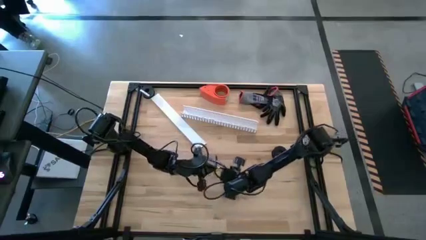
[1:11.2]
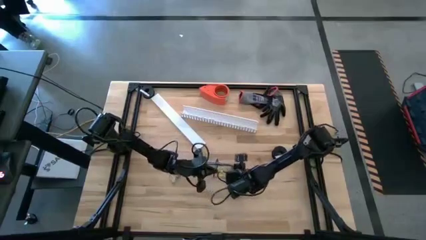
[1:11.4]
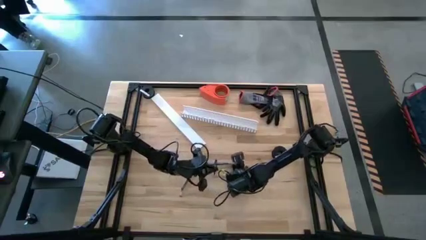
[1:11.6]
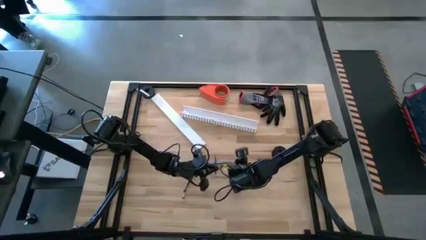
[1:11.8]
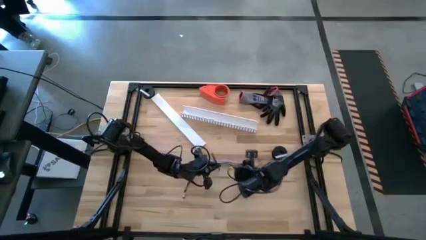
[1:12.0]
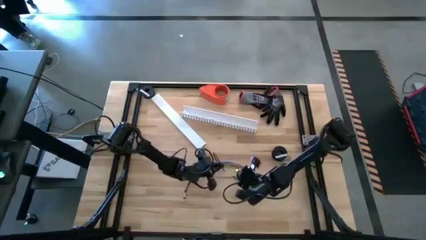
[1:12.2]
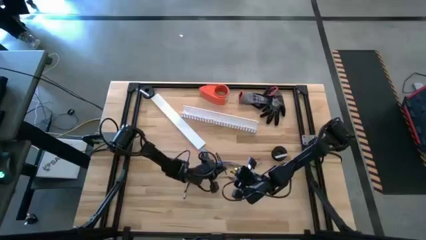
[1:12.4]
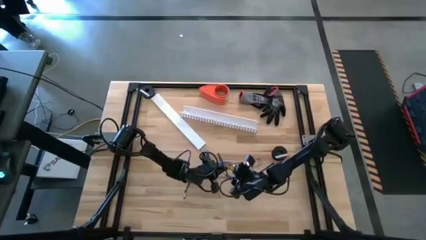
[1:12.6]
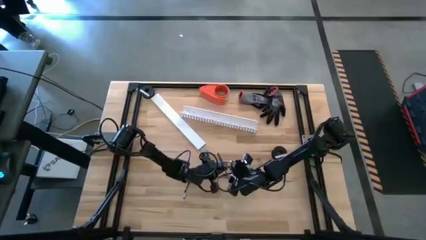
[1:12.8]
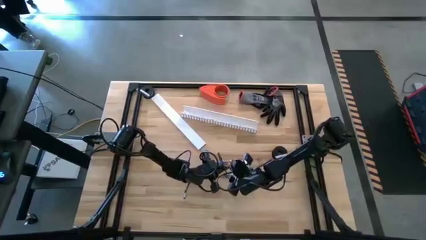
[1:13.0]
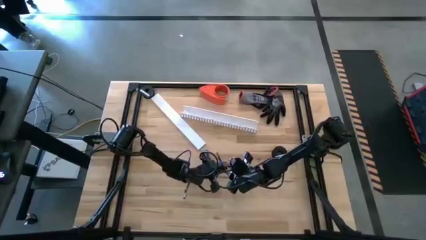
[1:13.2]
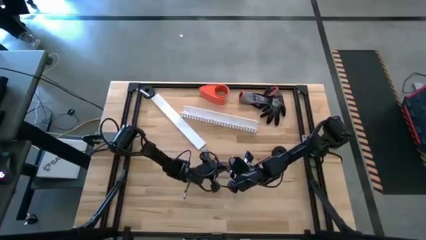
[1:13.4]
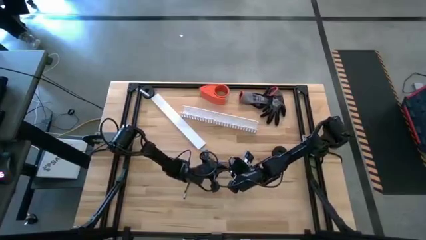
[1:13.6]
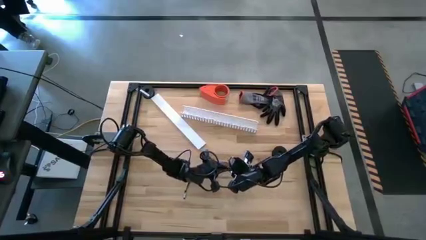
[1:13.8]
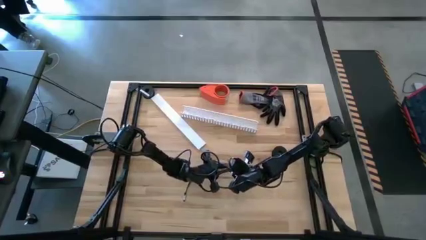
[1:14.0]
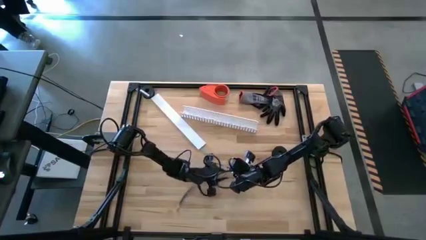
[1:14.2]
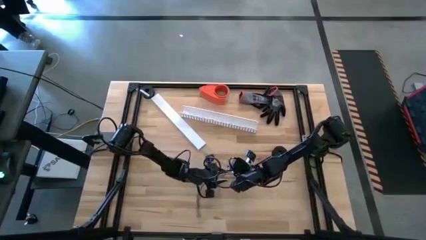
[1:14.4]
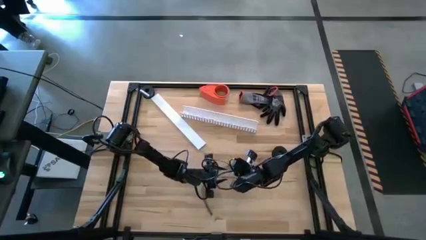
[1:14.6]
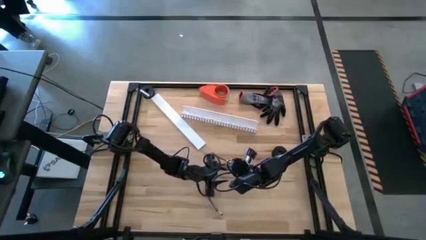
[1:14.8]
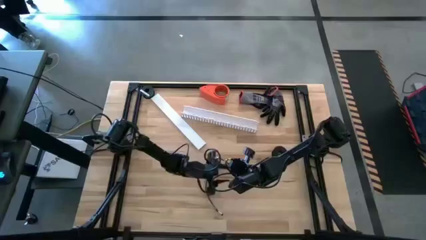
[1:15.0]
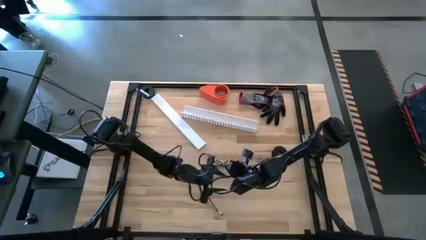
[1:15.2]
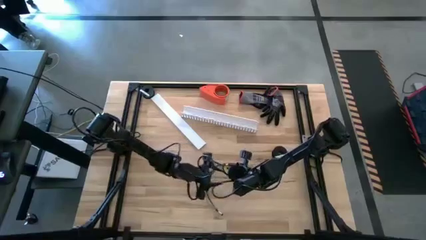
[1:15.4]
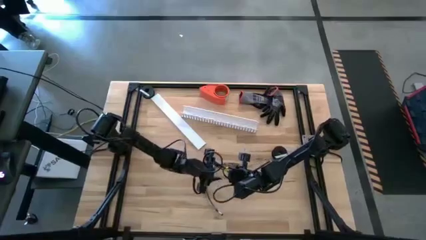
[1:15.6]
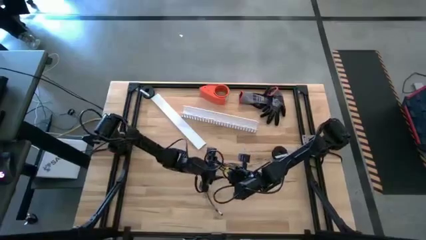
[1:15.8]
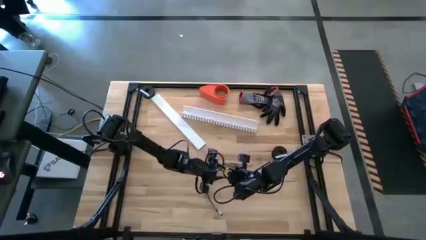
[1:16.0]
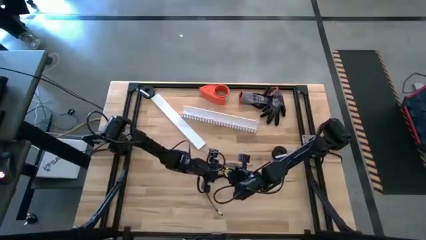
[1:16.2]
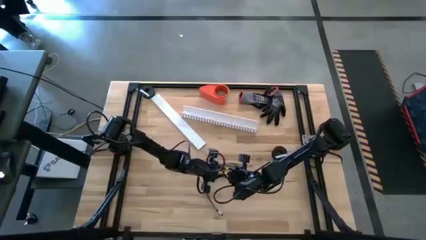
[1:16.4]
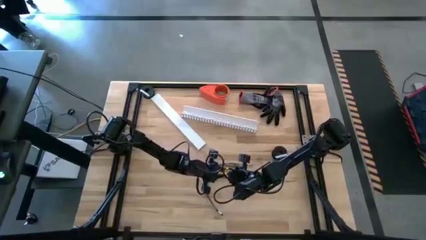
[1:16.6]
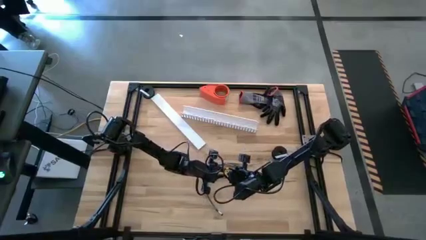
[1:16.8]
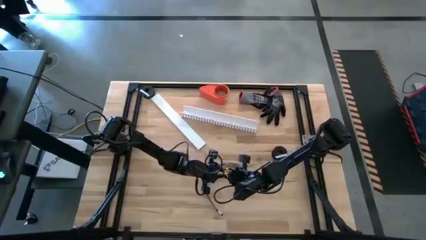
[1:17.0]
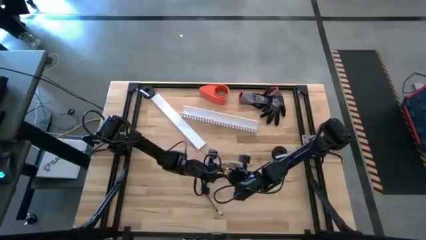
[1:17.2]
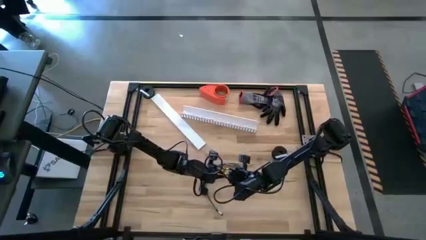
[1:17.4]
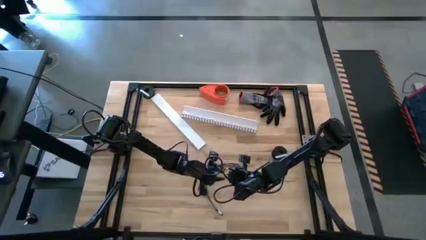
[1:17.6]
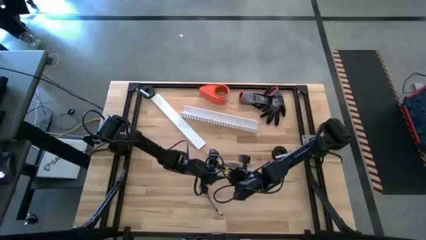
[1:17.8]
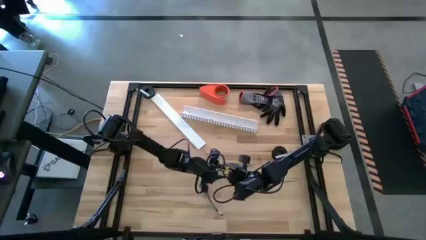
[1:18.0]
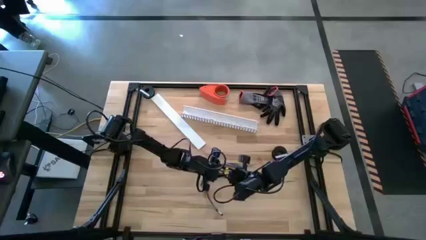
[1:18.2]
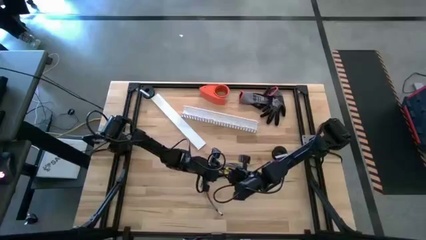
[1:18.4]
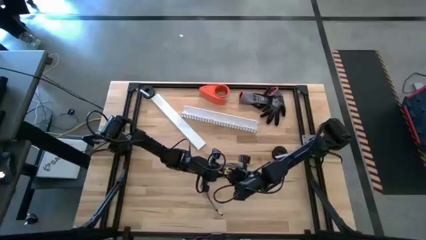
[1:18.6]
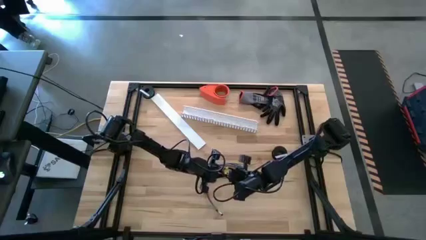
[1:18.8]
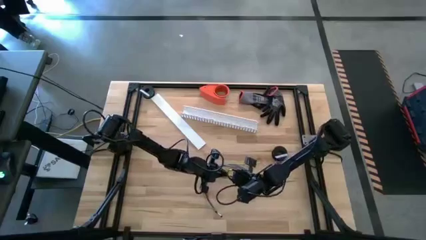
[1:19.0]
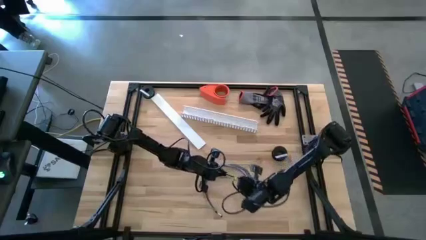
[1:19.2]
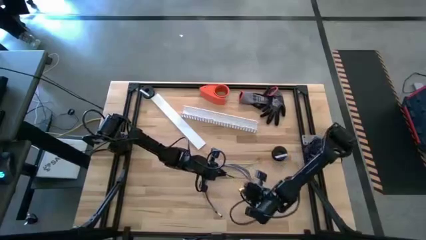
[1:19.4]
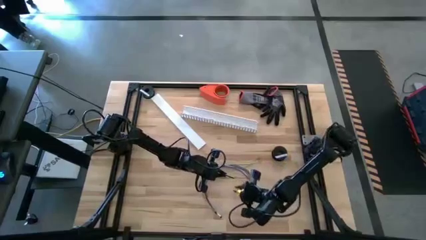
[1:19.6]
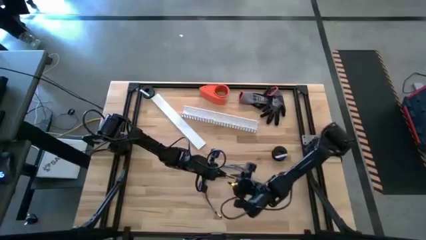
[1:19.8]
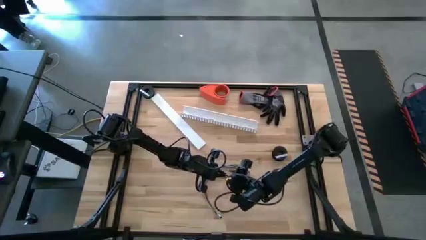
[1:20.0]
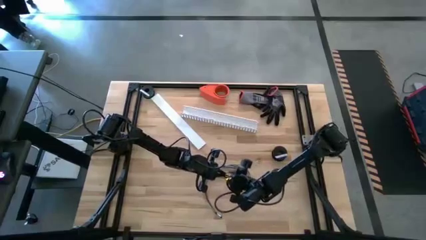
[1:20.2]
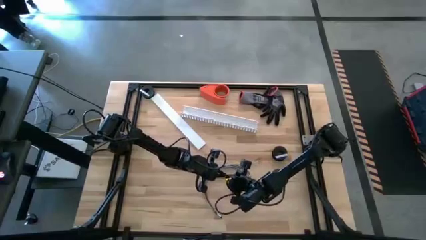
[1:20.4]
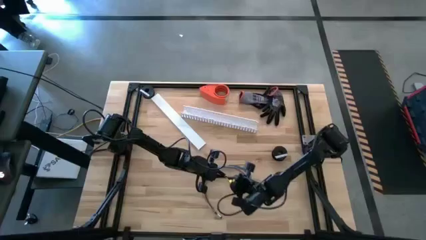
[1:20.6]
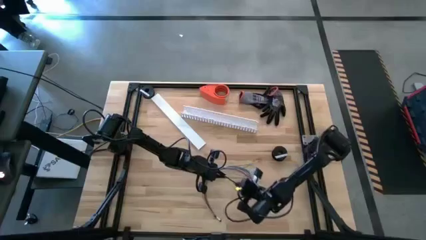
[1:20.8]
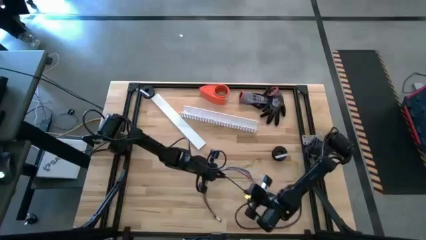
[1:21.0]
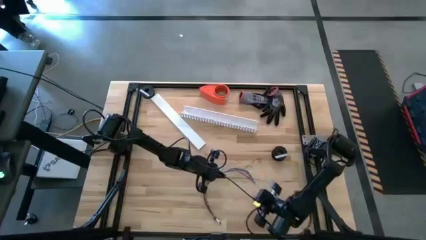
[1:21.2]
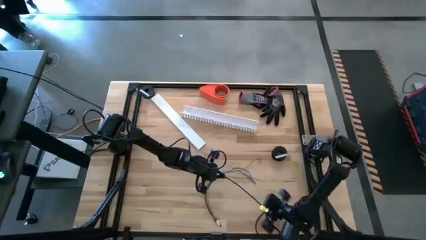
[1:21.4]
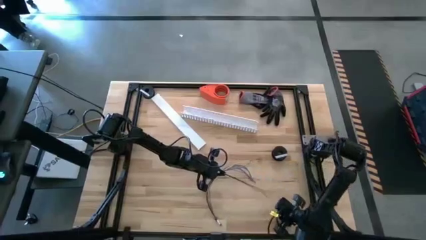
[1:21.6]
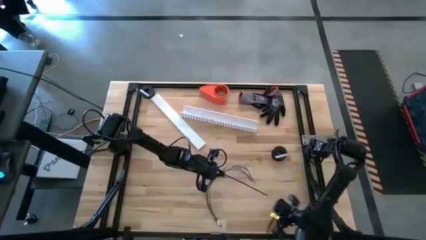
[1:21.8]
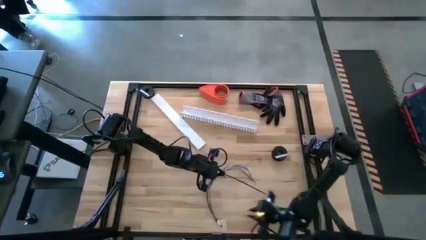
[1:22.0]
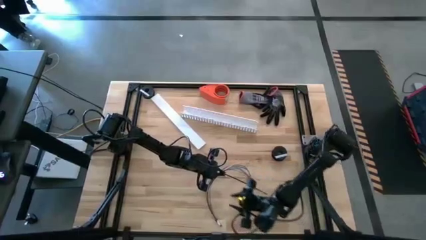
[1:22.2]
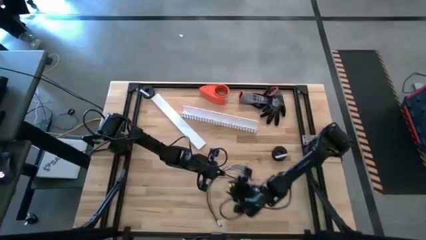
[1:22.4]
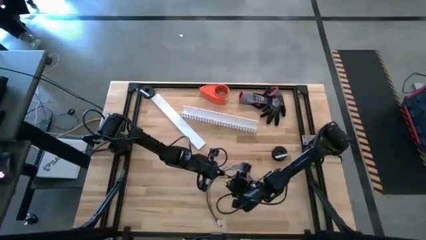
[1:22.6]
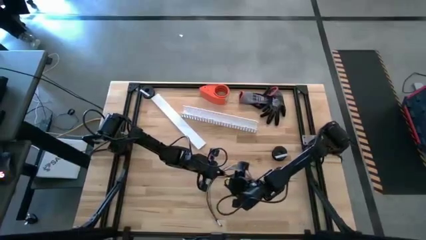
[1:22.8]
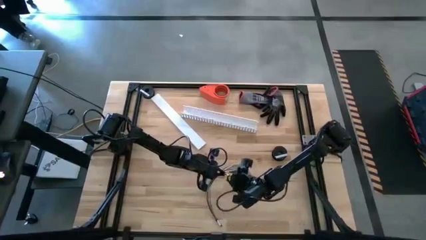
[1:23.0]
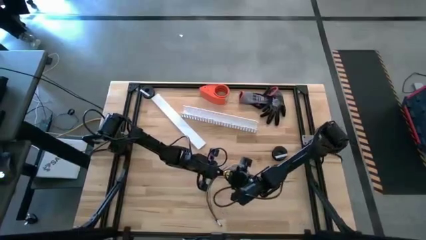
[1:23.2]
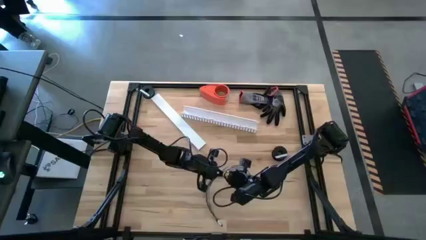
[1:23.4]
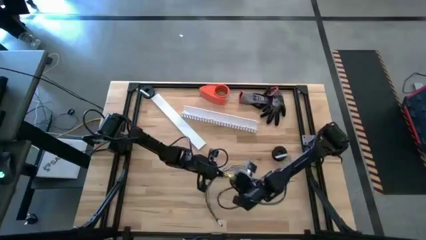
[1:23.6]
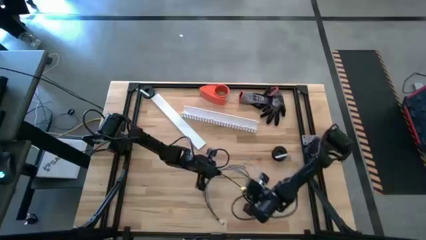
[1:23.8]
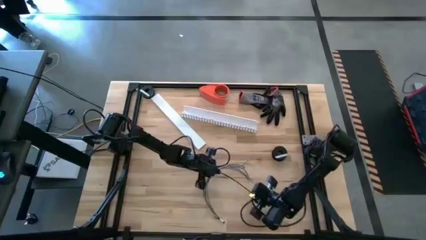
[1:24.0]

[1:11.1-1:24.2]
Task: Ziptie cables
Wrap the cable wires with the black zip tie
